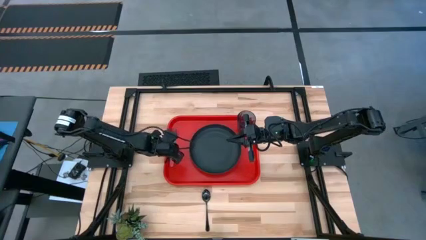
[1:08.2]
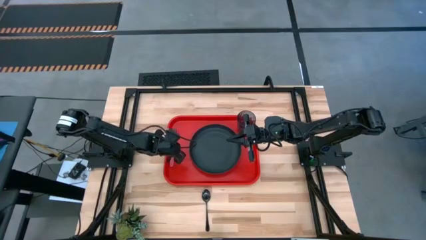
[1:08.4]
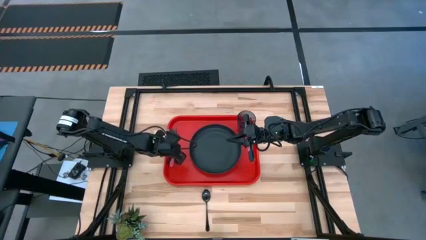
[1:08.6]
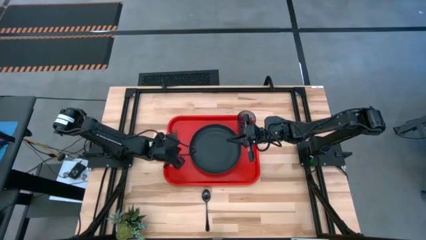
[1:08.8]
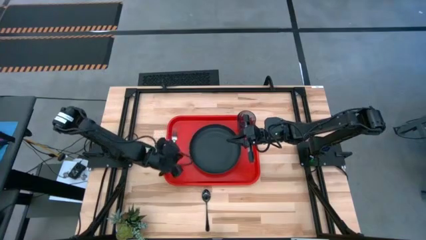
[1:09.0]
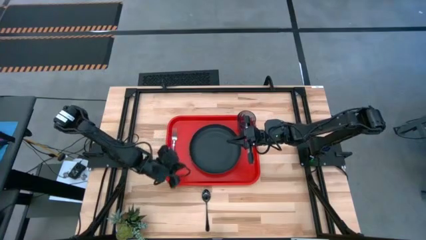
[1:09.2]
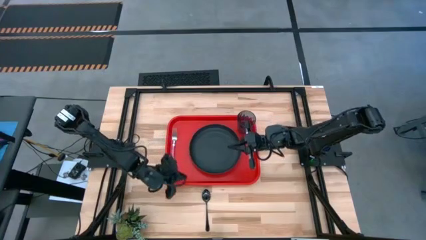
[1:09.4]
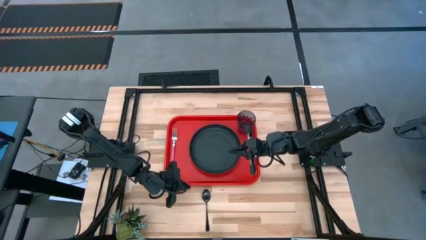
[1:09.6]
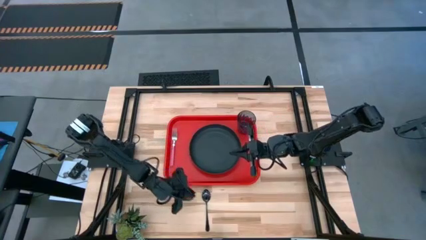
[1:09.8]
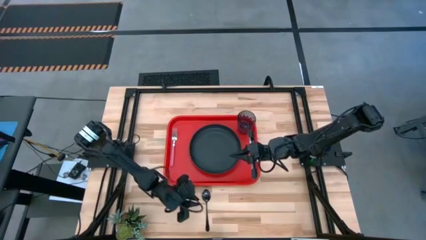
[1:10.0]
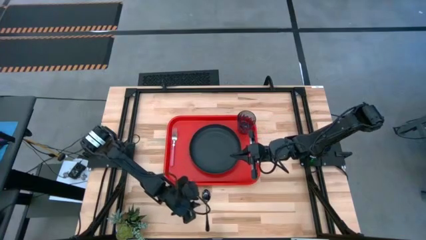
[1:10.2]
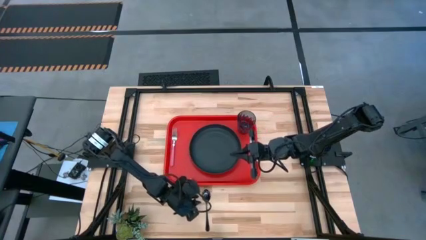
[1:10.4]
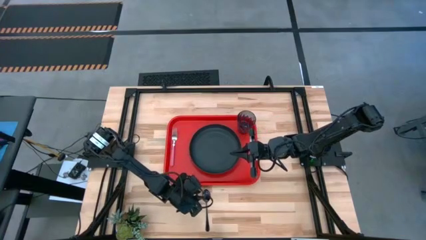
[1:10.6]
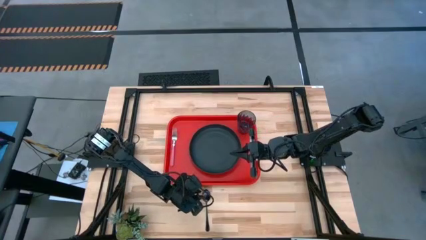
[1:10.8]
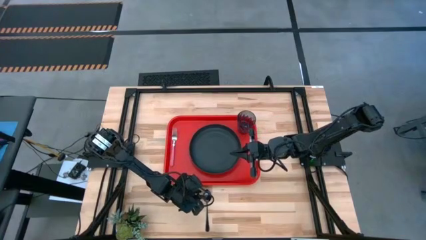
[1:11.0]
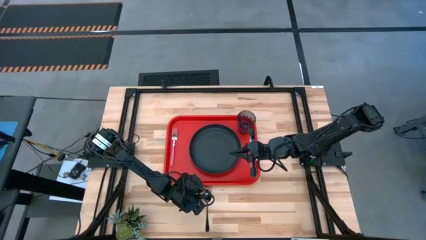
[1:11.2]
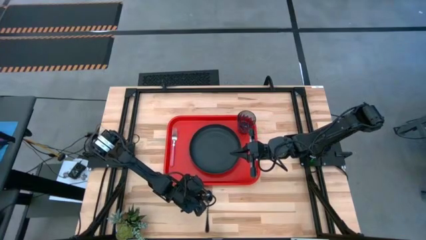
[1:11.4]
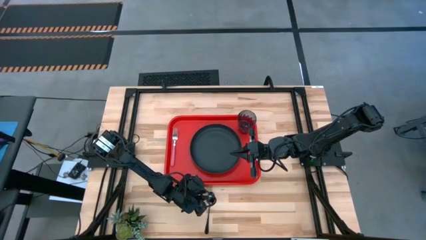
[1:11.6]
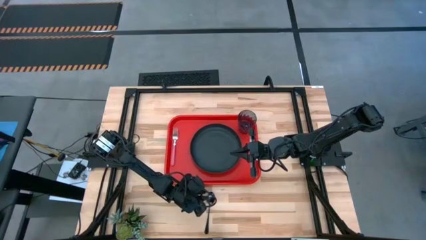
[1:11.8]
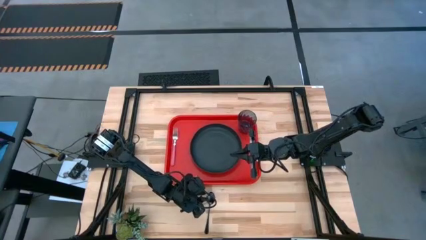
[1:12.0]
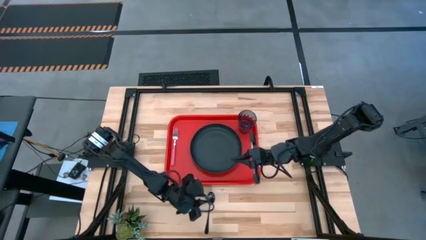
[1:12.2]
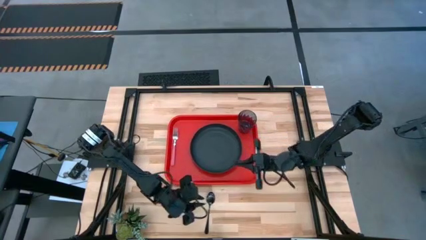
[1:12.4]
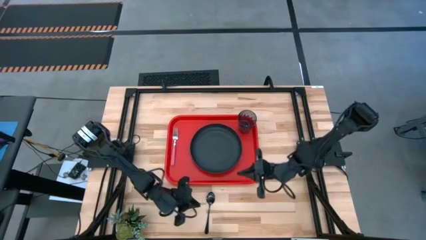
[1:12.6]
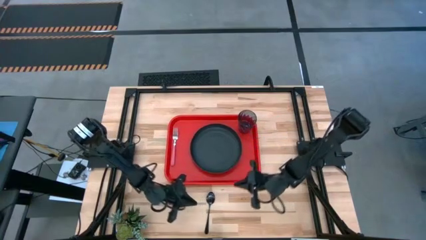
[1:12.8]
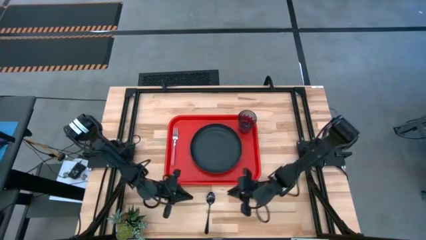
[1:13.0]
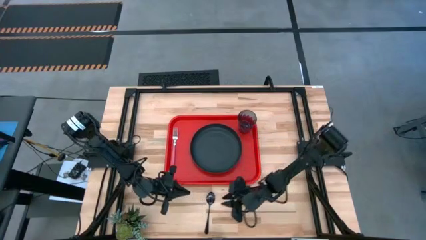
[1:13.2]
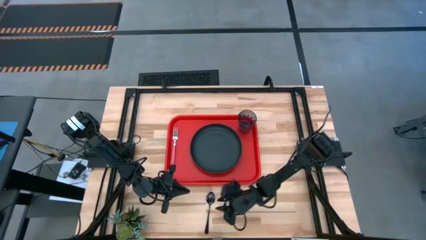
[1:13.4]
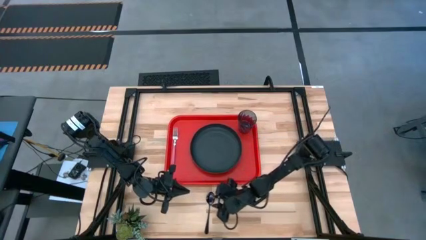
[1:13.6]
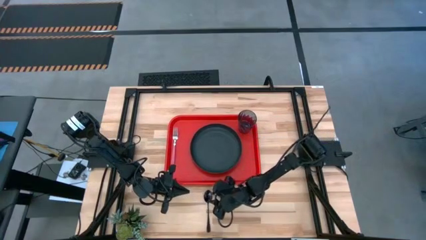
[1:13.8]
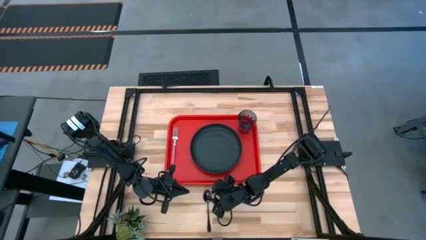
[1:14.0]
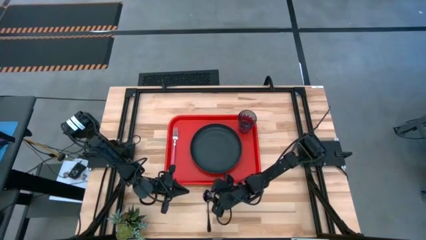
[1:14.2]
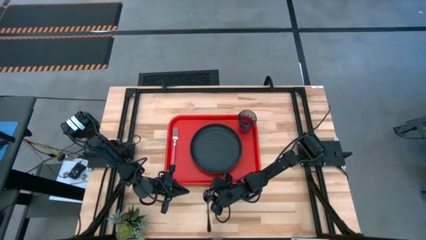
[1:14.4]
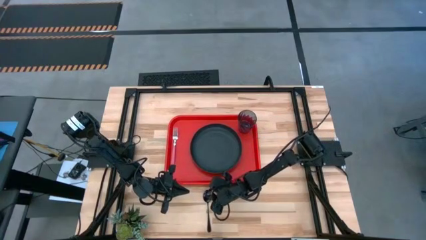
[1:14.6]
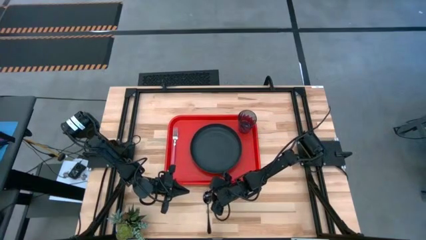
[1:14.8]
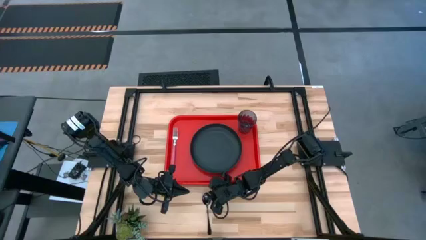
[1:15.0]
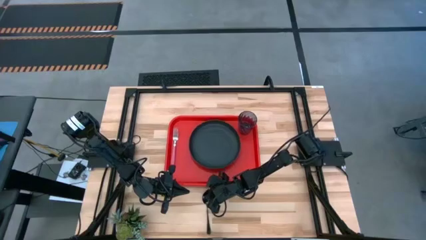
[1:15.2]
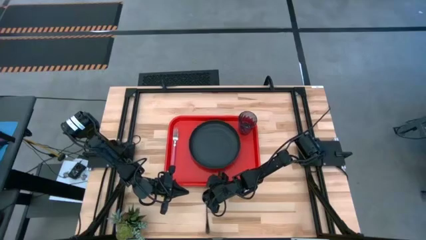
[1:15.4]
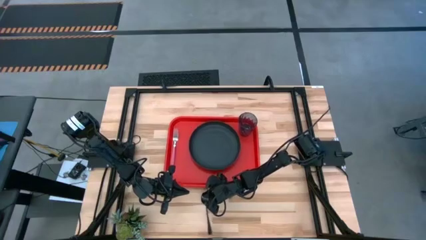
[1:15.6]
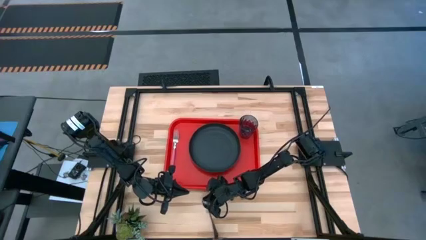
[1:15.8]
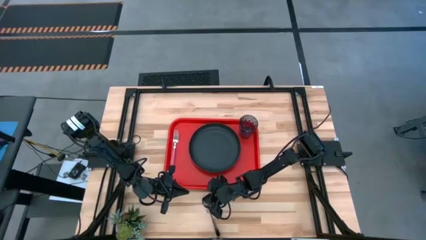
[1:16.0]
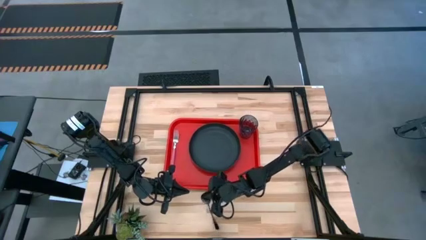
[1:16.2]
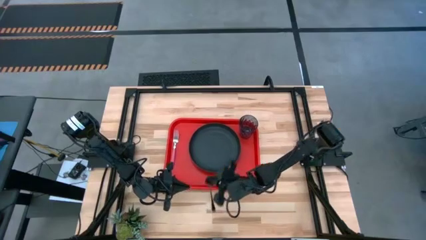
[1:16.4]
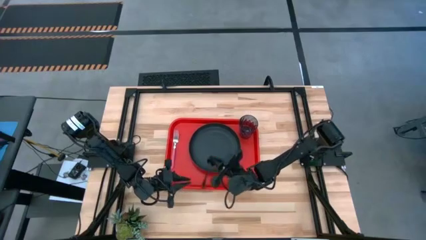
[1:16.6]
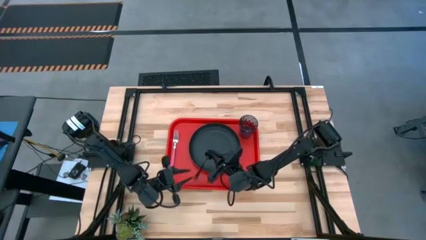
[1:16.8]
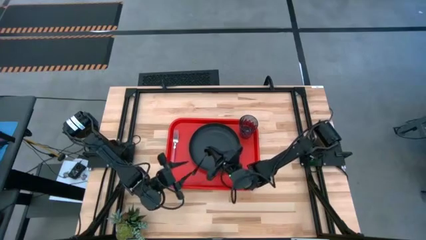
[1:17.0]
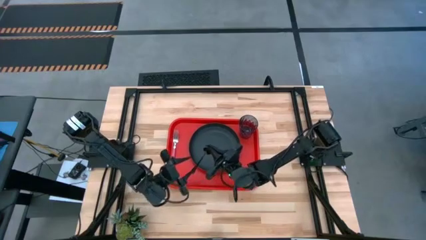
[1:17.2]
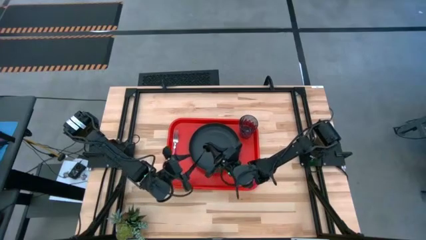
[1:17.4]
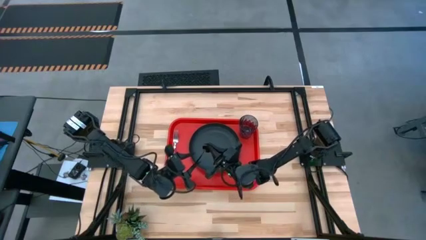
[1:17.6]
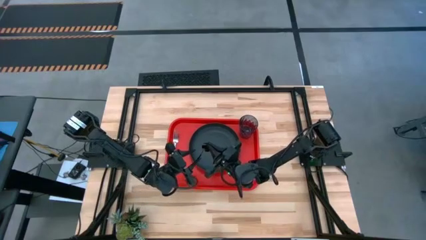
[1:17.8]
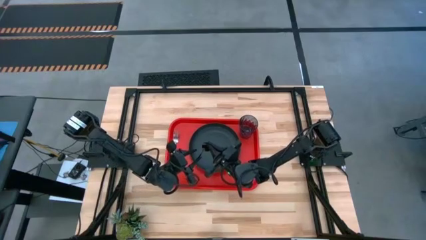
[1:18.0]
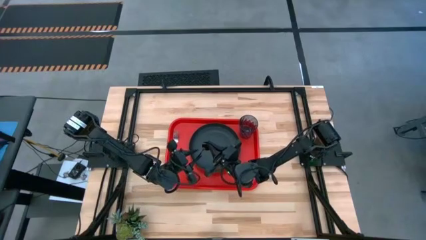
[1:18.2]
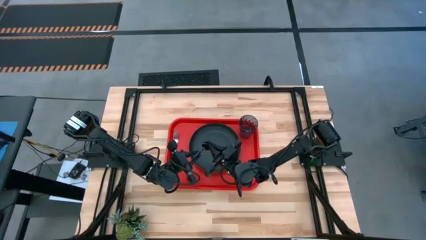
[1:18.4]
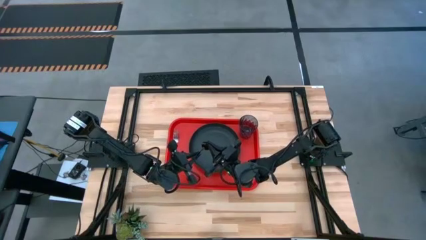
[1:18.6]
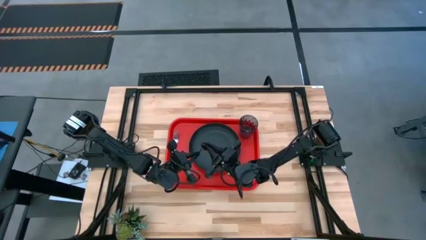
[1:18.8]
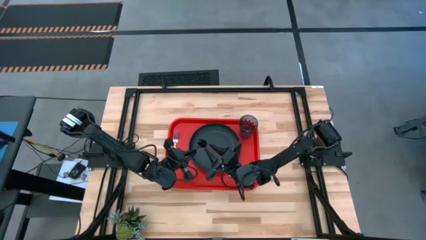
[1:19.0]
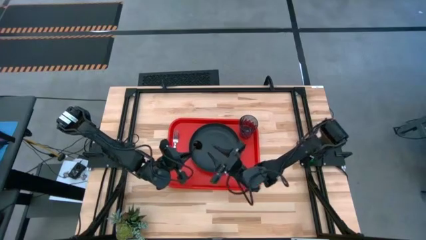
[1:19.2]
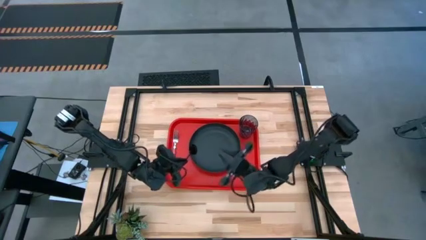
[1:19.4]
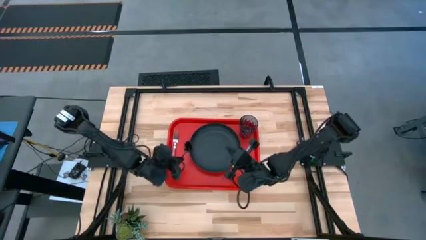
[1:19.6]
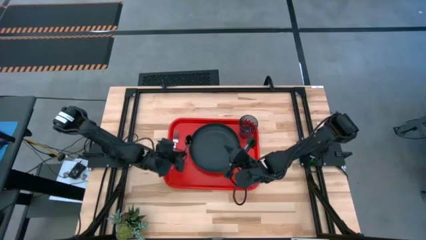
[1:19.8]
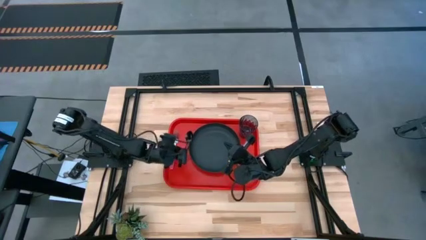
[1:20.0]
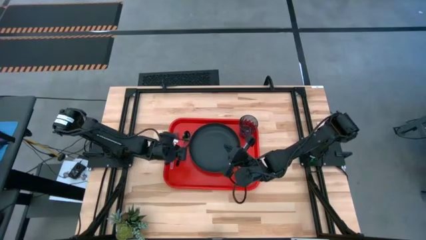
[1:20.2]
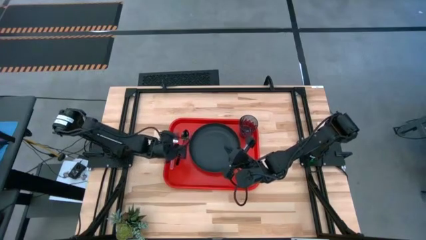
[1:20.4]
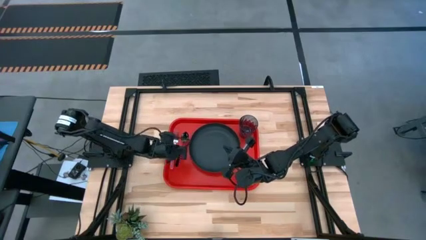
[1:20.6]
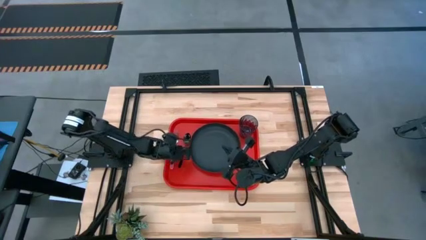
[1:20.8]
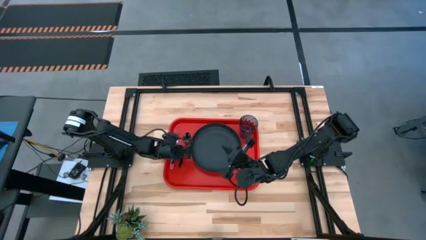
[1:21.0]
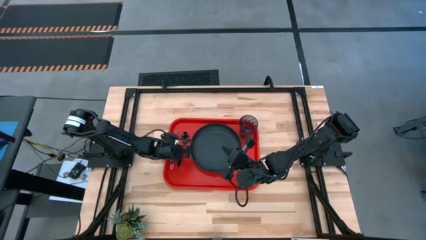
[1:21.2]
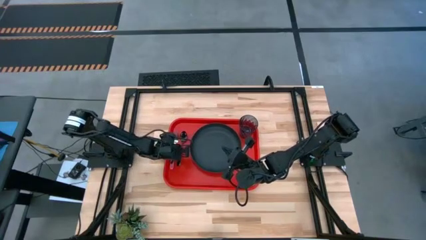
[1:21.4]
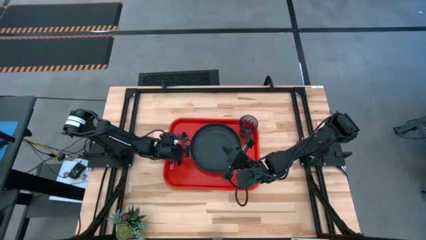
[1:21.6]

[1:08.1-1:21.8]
Task: Pick and place plate/cup/fork/spoon on tray
Put the black spoon on the red serving tray to the right of the black plate

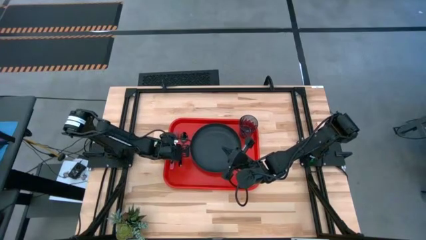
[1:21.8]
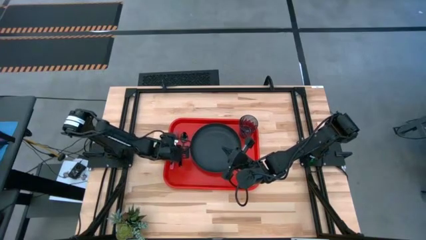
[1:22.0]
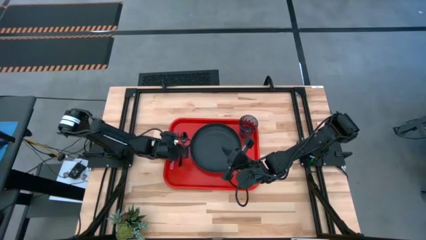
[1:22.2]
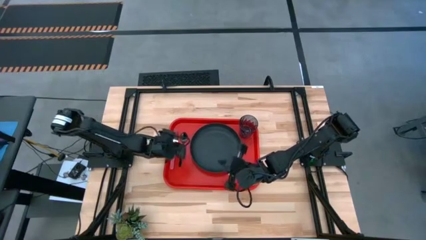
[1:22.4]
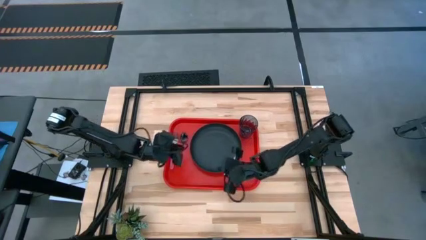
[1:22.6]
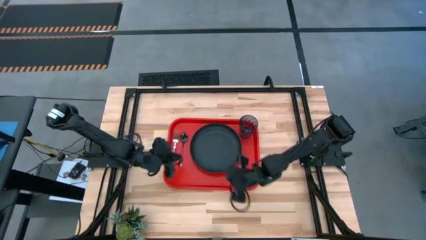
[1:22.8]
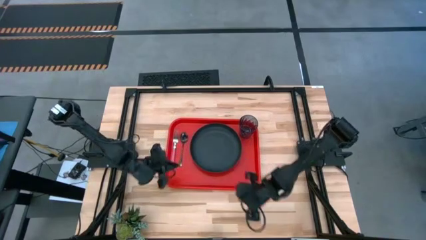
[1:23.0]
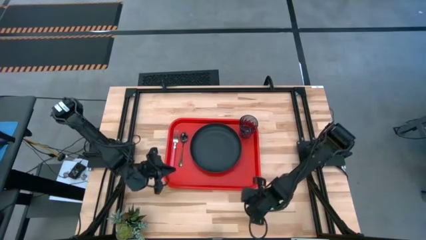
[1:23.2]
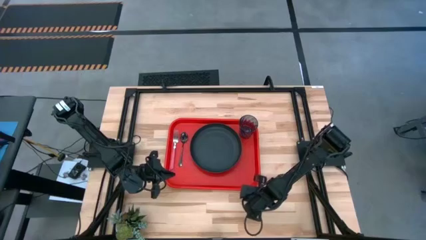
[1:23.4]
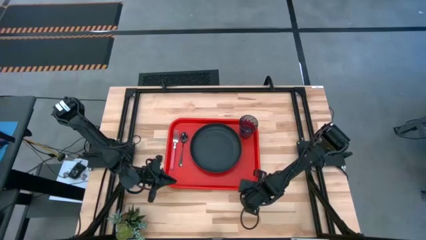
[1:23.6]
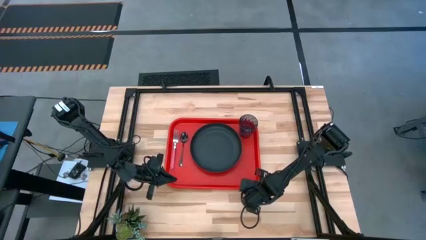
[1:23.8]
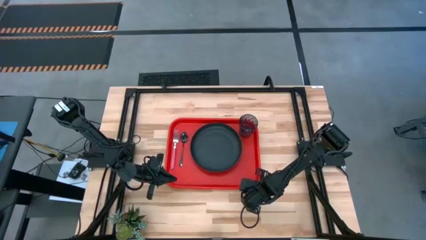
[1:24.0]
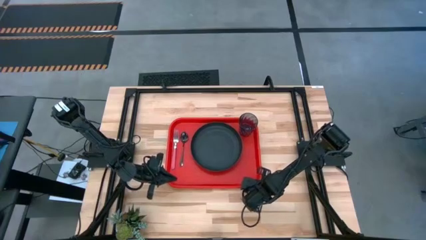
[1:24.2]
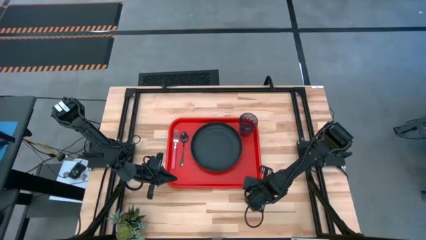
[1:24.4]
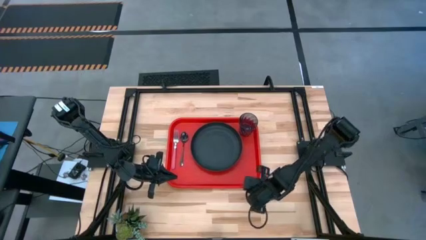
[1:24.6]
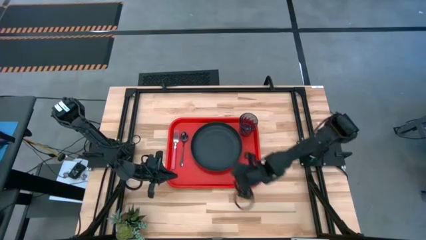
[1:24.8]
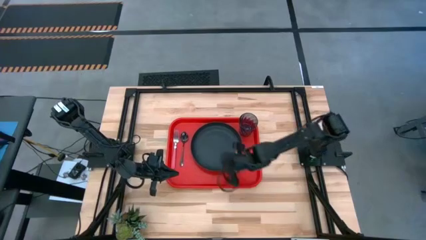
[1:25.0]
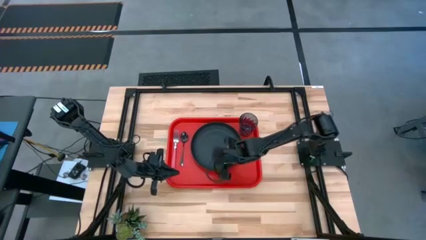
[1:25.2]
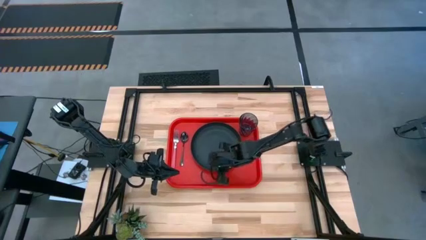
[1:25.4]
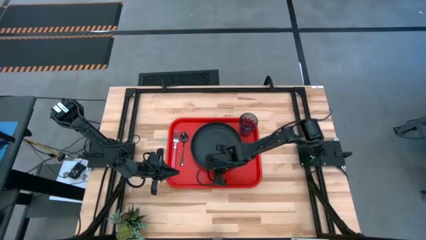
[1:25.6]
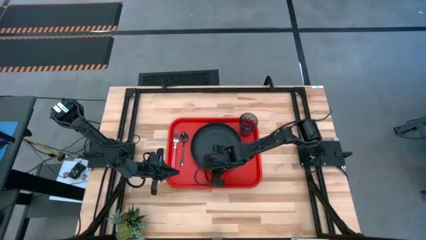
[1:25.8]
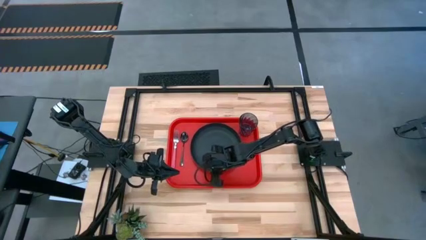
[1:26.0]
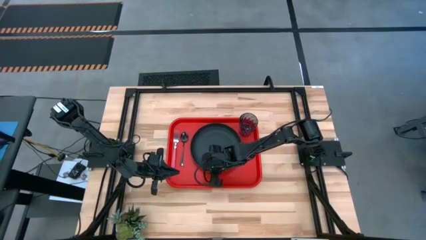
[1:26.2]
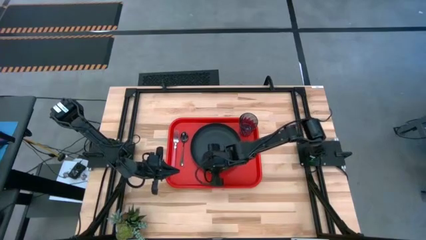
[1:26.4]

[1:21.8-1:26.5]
Adjust the red serving tray and the black plate on the table
